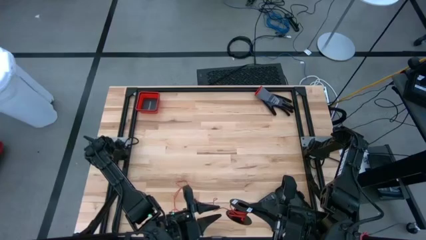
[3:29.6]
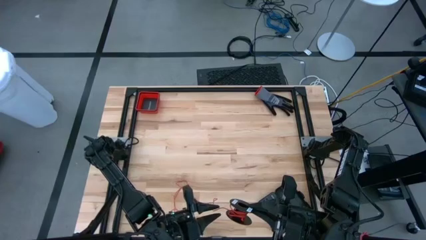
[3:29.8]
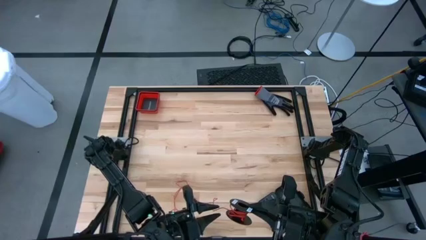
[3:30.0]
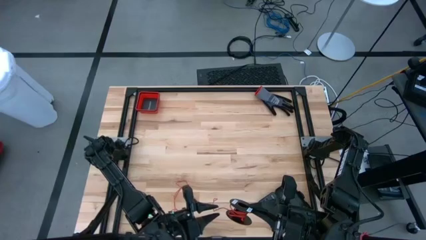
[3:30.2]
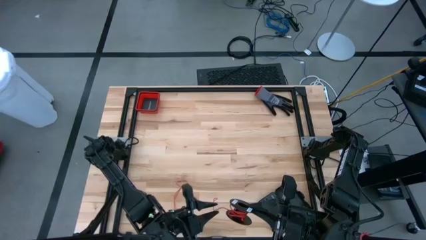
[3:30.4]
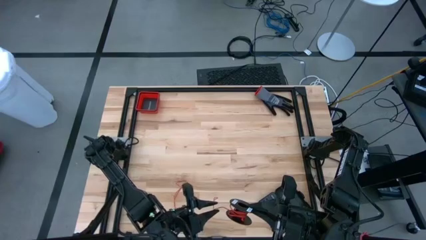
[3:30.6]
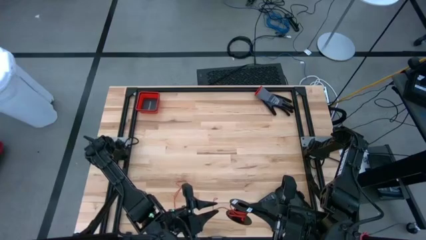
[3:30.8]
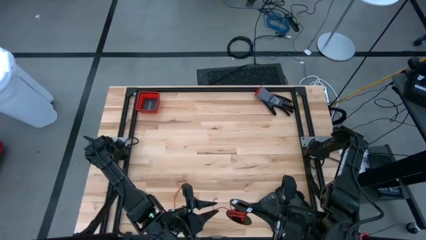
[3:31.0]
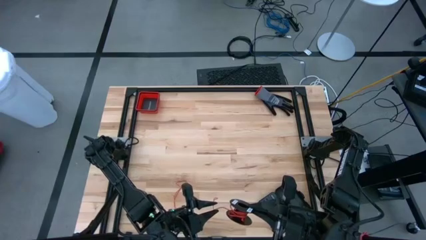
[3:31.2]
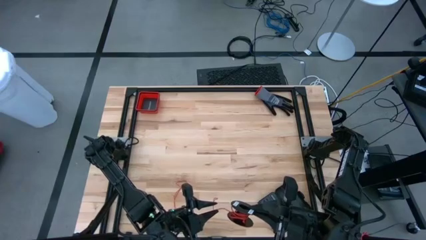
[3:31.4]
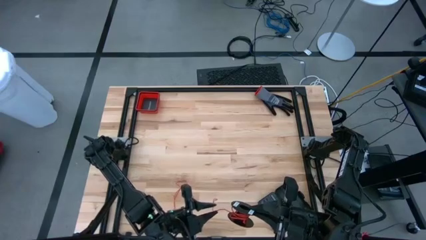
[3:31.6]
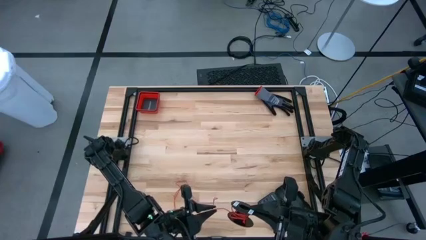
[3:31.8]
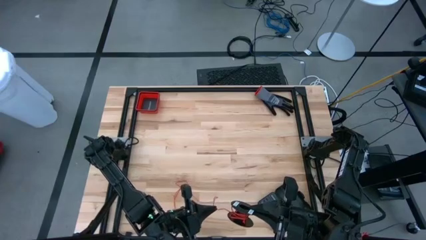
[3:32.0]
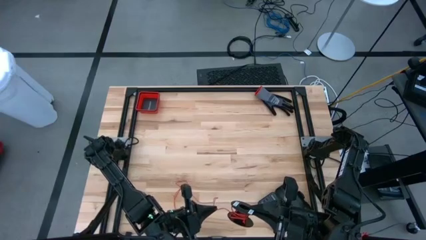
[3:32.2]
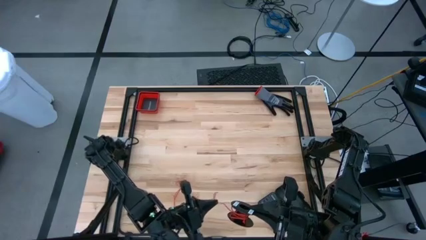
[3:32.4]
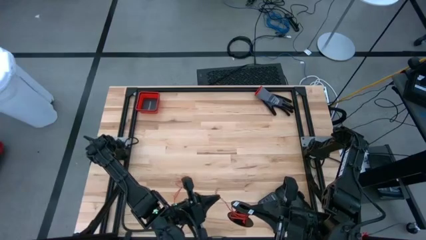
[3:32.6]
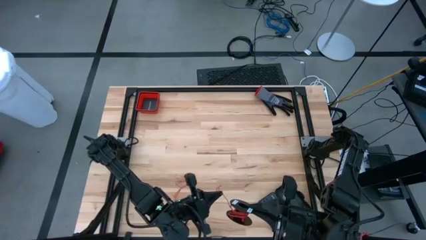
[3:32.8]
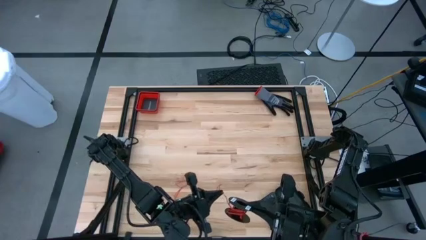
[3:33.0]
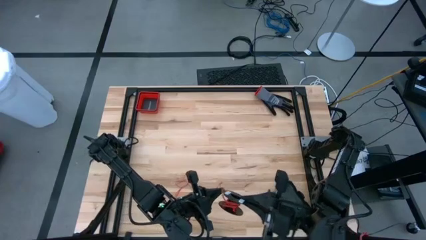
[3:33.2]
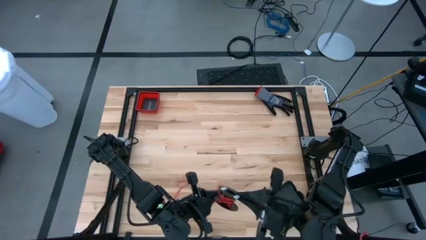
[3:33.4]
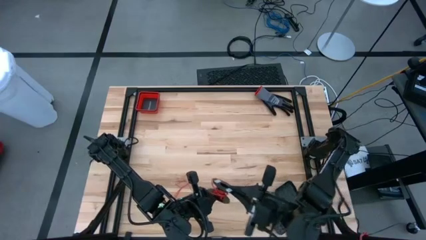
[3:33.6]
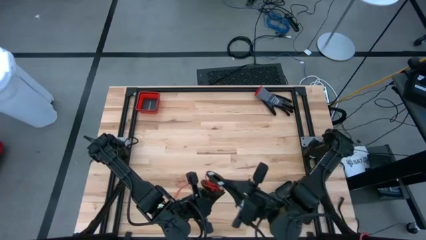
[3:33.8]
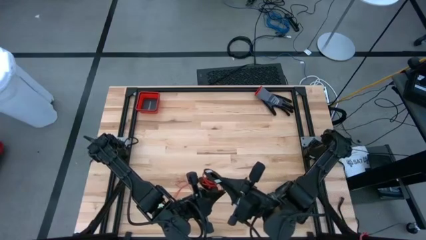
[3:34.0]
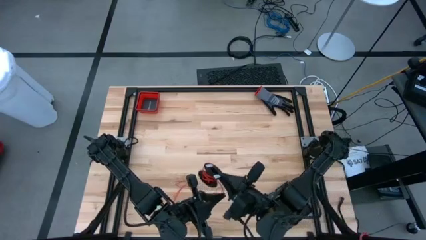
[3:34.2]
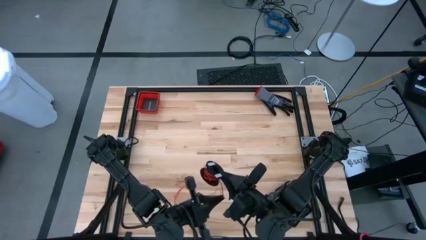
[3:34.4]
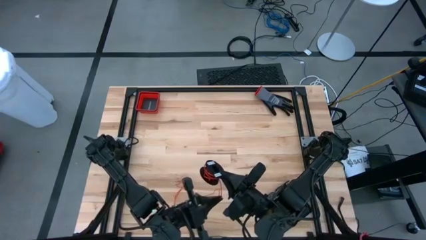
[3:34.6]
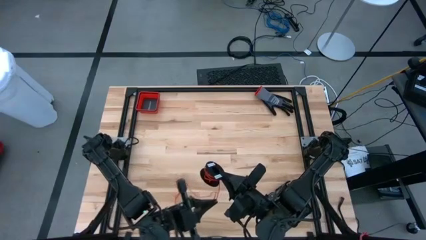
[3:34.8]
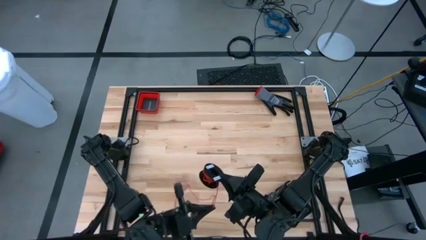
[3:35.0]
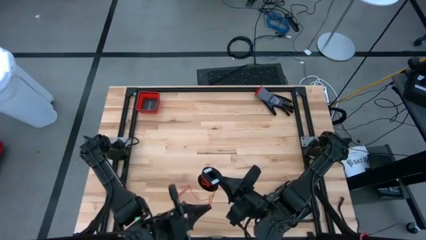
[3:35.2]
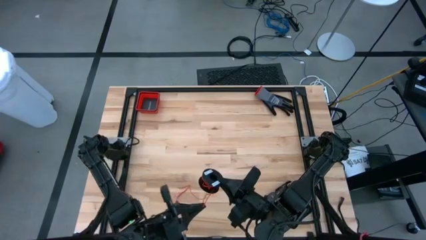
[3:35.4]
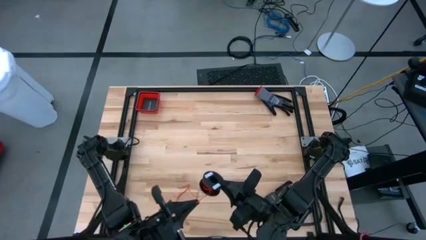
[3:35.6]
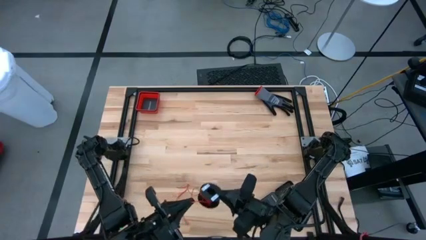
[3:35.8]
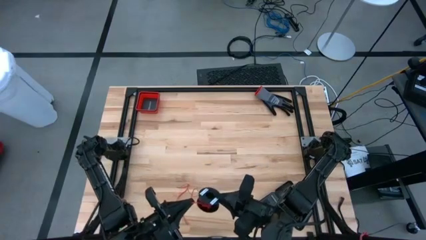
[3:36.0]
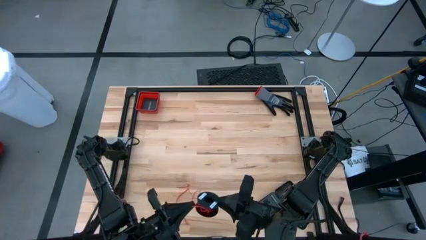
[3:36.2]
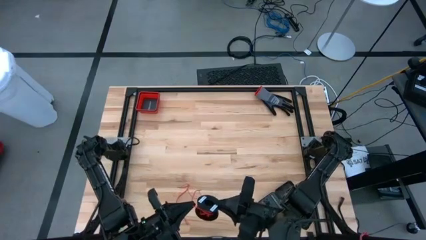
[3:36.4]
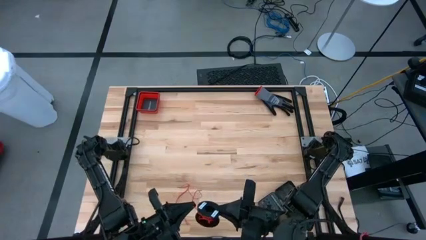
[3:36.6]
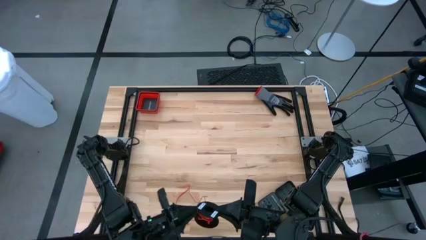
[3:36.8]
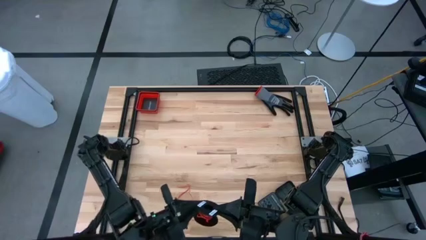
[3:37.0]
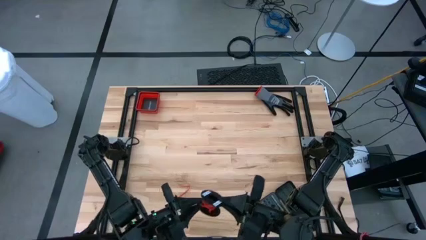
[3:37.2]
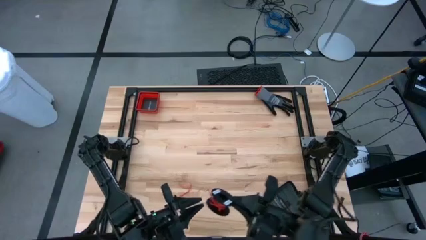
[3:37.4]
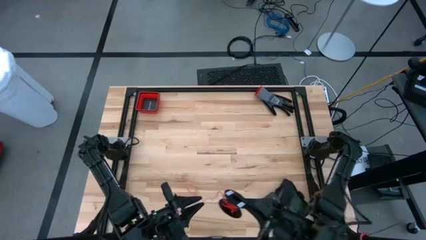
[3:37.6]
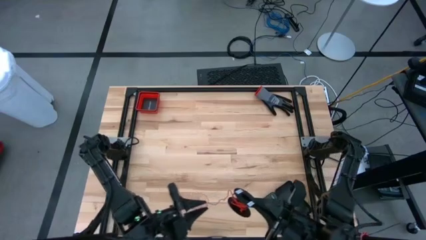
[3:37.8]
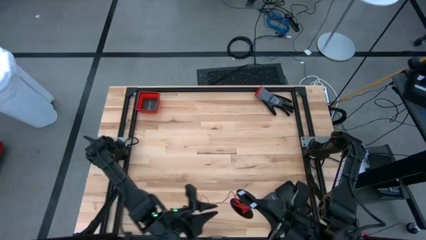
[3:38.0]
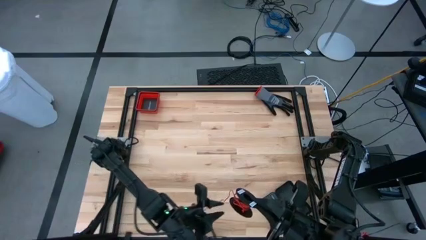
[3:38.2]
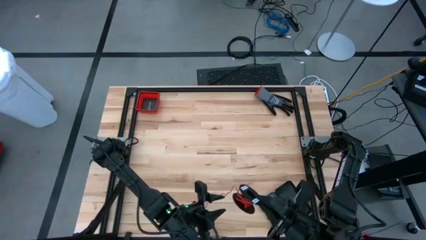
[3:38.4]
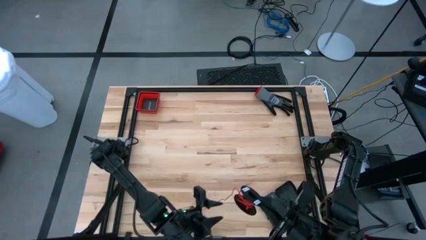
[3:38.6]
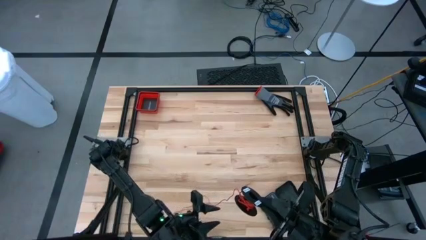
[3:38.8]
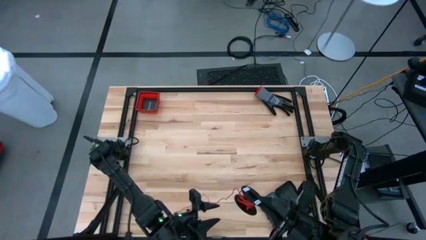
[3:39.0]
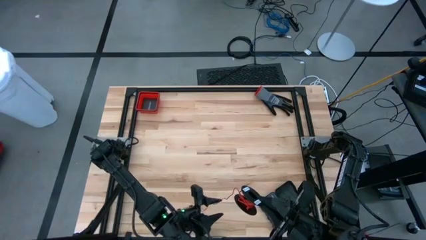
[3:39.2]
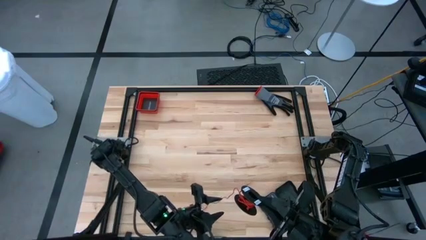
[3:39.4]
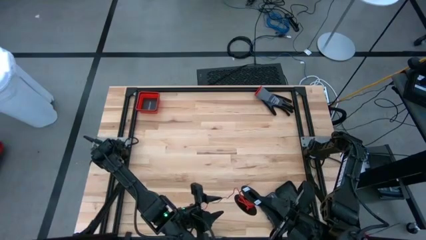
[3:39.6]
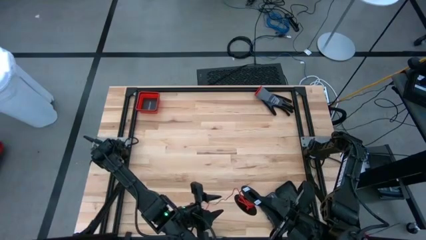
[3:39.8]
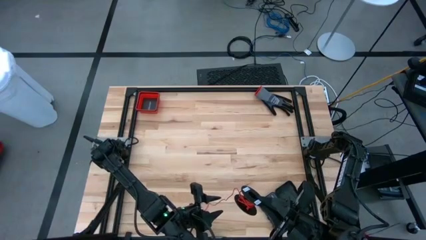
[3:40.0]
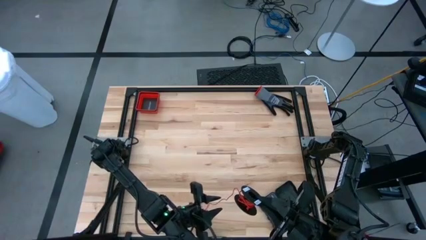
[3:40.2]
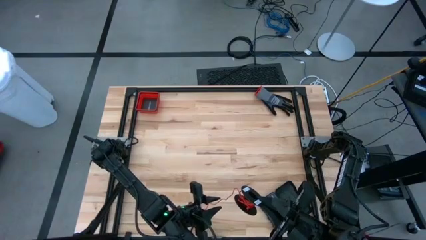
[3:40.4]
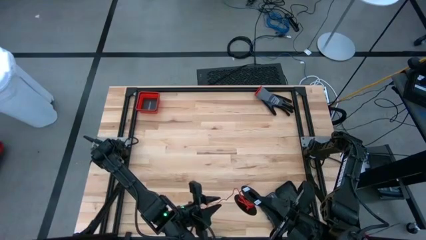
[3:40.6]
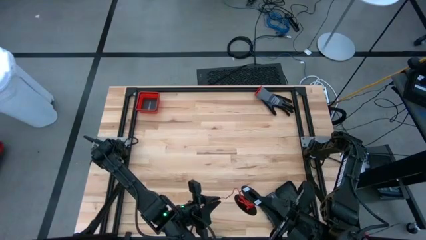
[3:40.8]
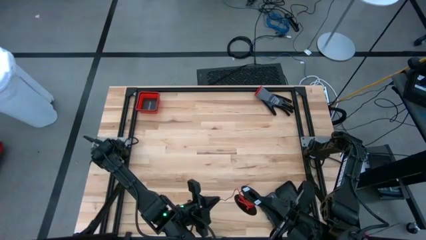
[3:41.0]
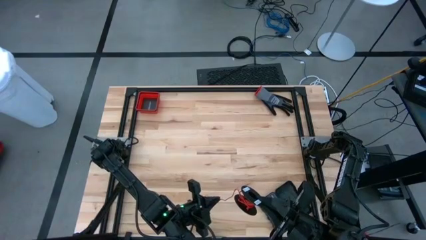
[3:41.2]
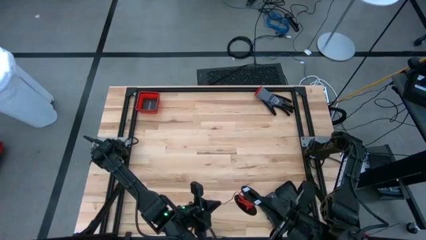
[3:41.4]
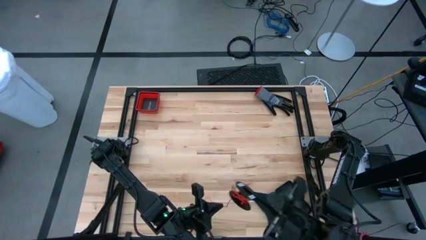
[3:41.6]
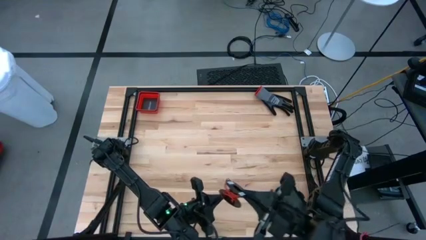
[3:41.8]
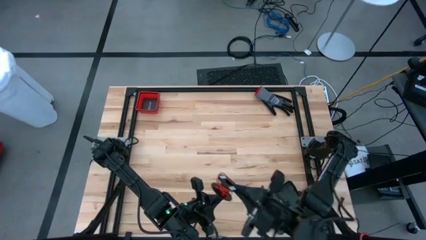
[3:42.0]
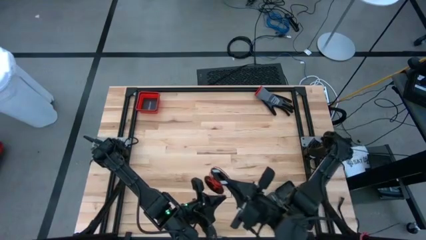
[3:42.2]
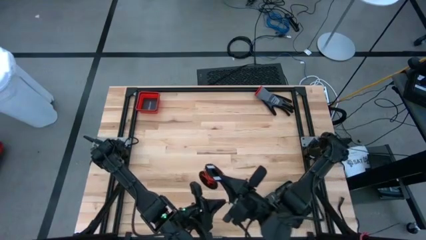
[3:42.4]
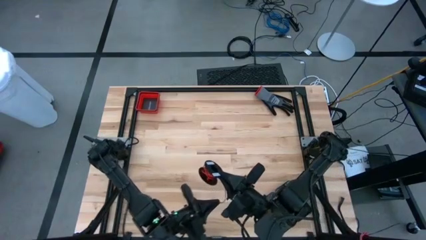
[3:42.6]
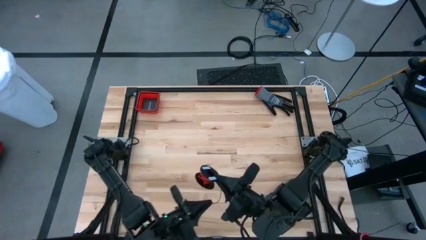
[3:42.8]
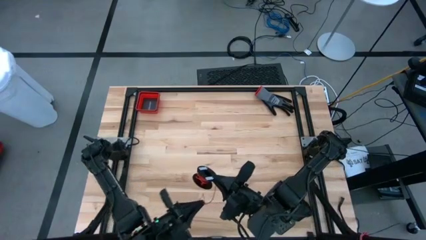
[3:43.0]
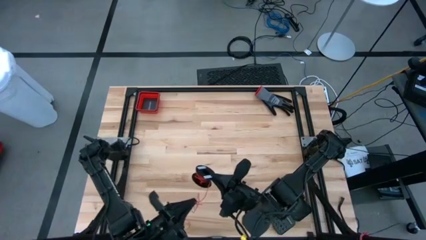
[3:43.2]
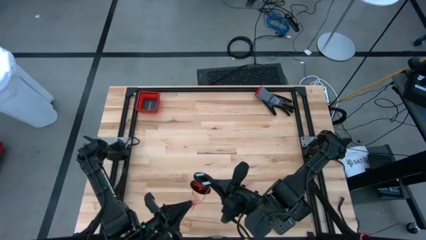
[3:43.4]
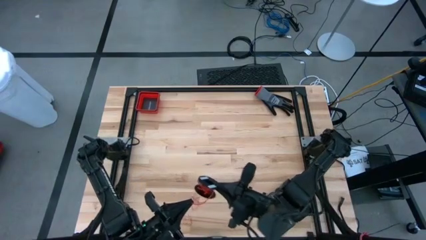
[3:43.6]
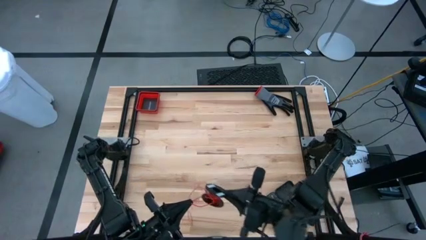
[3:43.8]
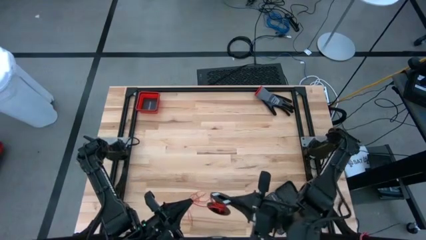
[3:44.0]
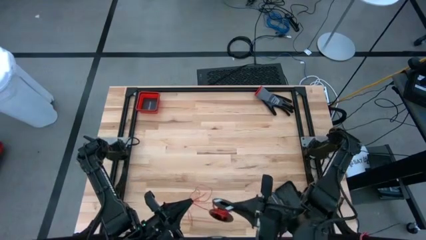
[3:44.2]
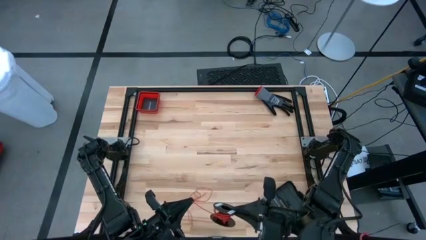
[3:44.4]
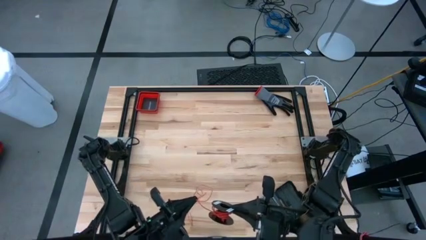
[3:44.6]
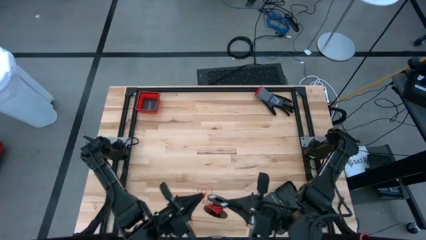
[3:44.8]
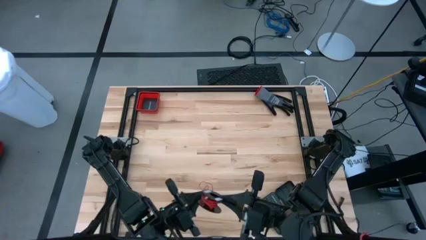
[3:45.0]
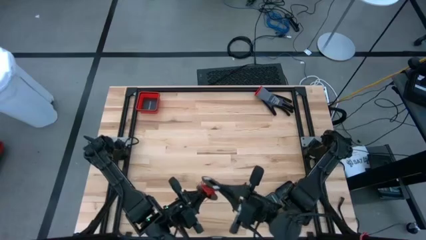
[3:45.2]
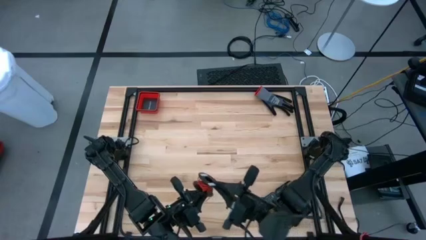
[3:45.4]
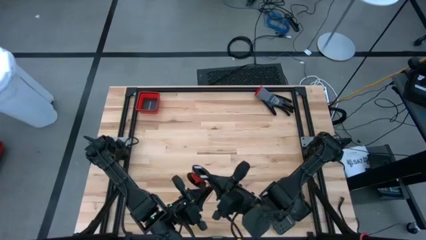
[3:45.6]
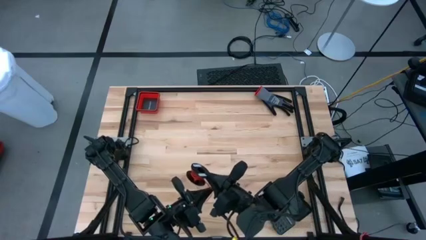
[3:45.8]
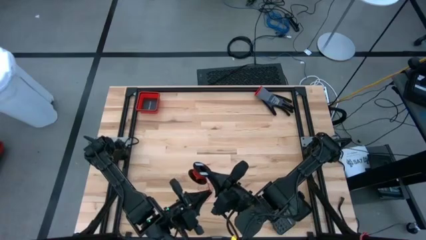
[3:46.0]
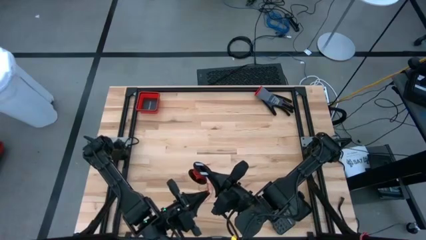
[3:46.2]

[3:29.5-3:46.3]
Task: Coil cords
Coil the red wire onto the spool

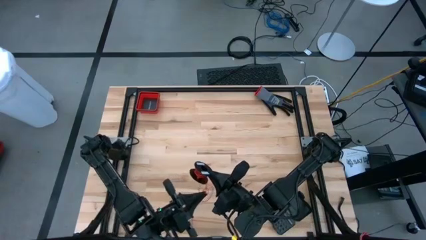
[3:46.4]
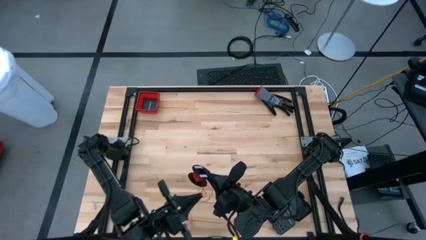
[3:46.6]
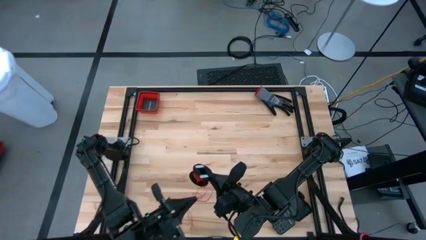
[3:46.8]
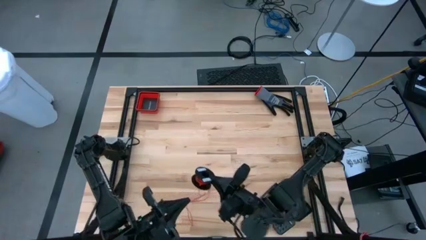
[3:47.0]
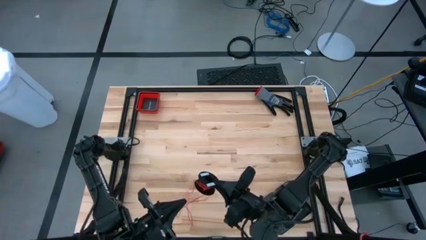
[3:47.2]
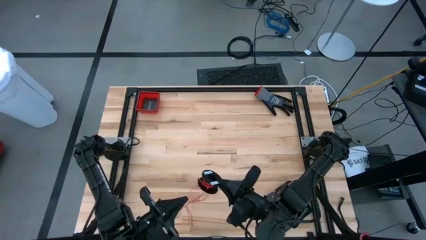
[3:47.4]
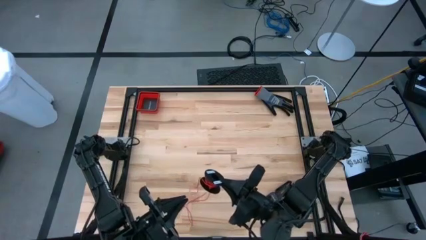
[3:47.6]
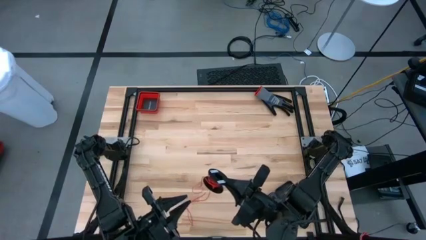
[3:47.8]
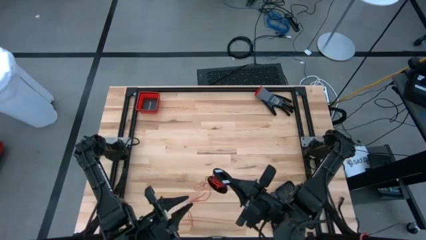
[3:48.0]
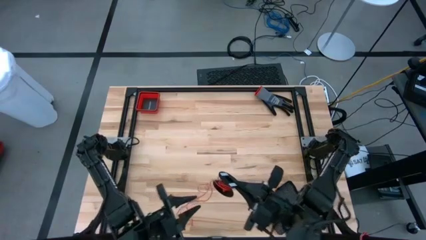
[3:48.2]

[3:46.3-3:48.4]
Coil the red wire onto the spool
